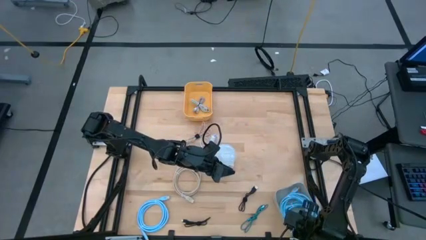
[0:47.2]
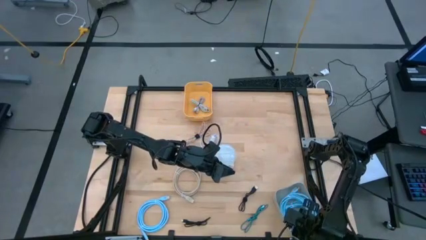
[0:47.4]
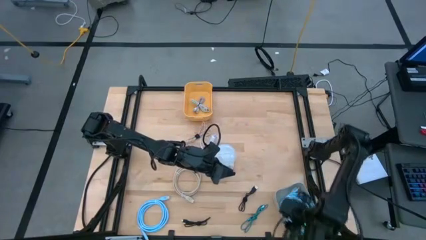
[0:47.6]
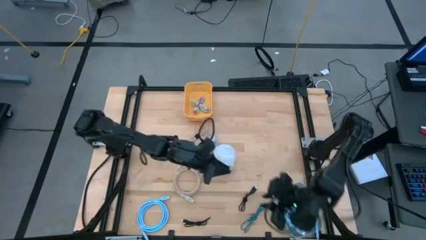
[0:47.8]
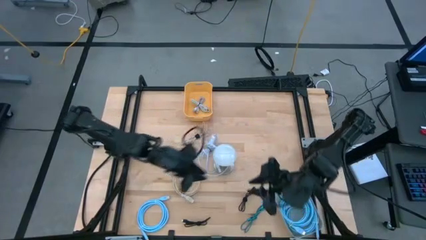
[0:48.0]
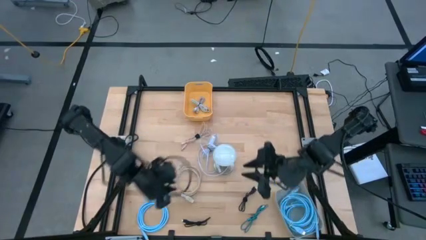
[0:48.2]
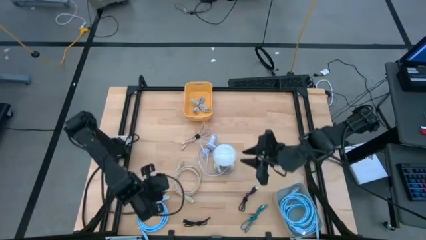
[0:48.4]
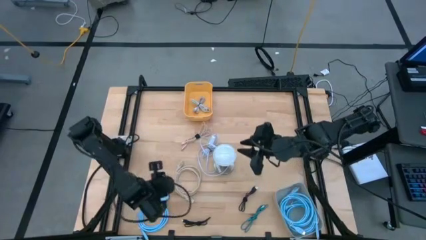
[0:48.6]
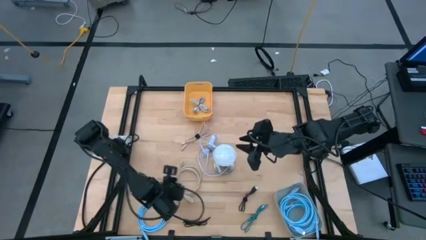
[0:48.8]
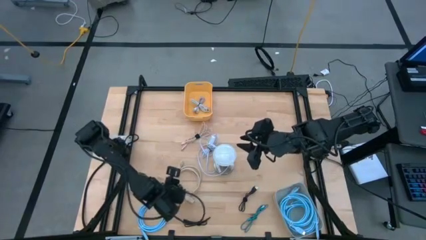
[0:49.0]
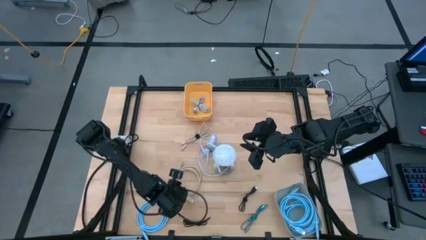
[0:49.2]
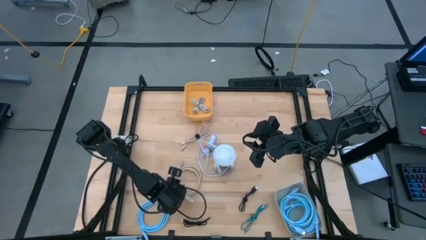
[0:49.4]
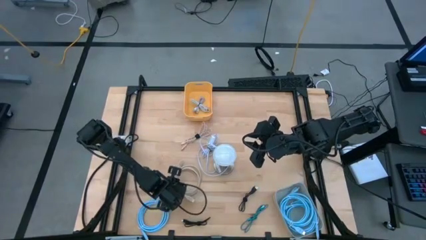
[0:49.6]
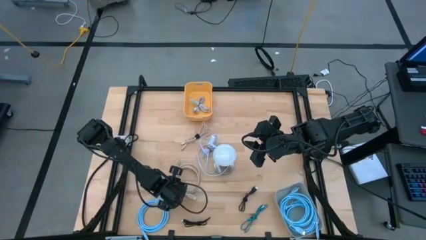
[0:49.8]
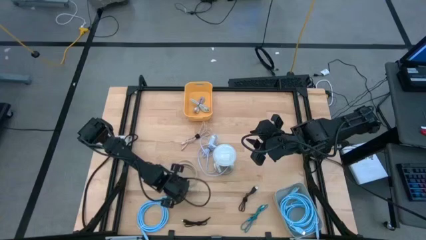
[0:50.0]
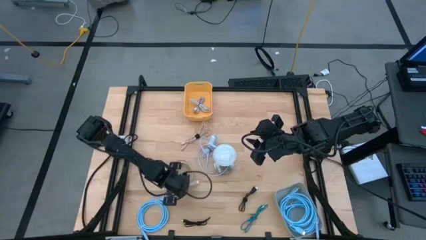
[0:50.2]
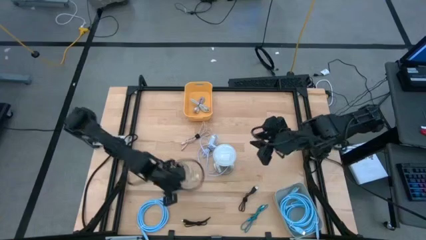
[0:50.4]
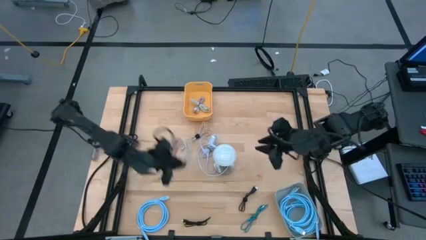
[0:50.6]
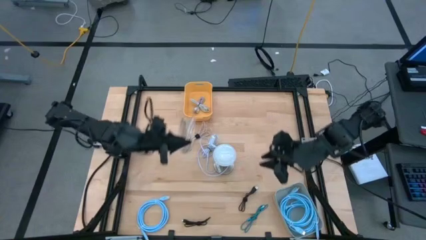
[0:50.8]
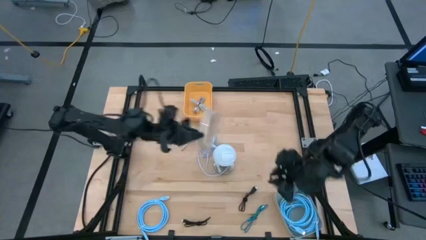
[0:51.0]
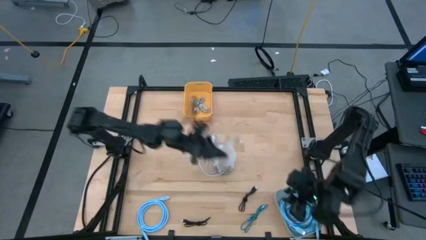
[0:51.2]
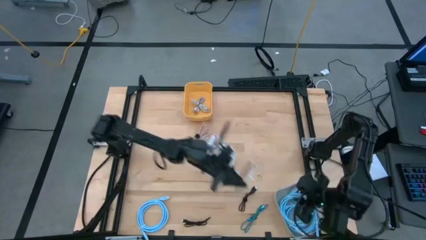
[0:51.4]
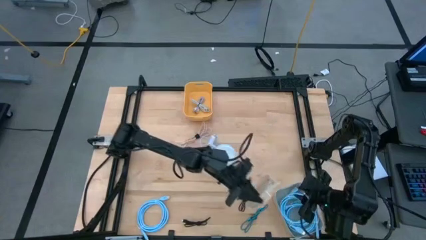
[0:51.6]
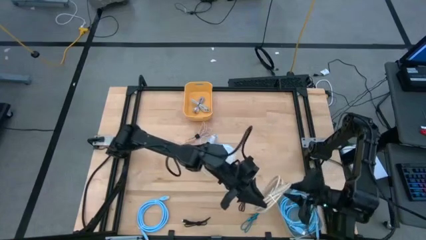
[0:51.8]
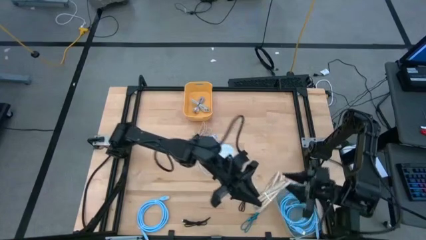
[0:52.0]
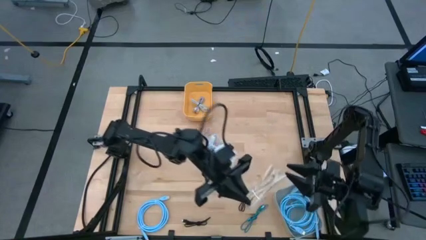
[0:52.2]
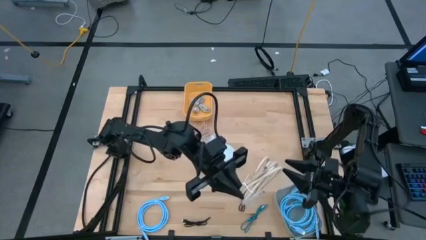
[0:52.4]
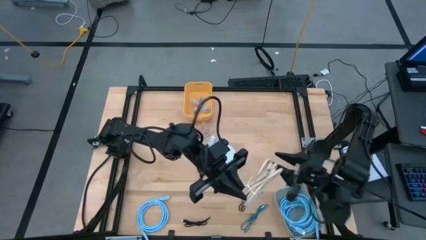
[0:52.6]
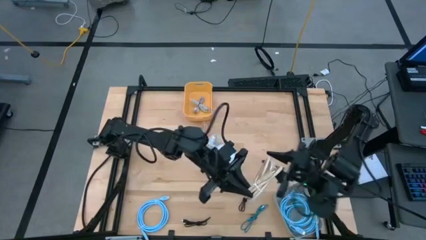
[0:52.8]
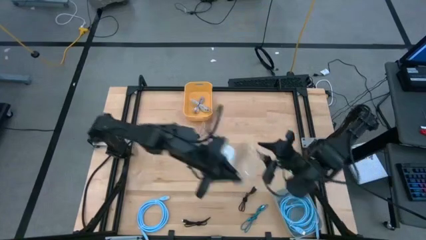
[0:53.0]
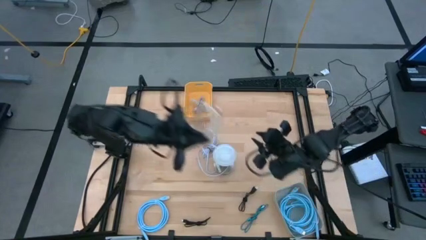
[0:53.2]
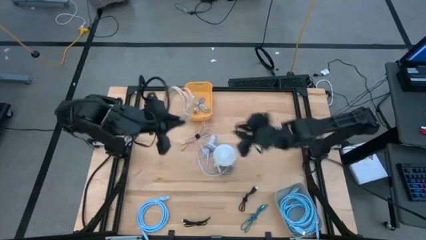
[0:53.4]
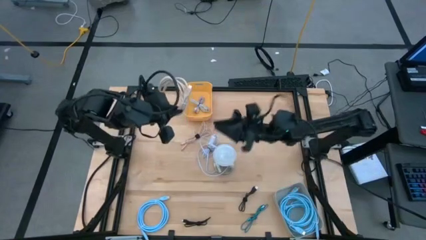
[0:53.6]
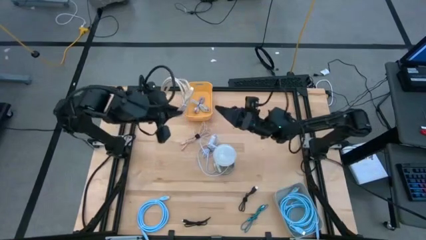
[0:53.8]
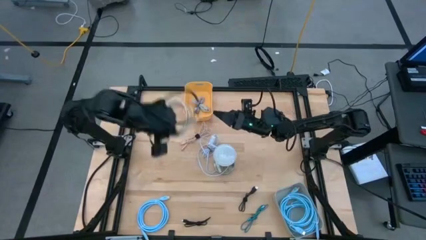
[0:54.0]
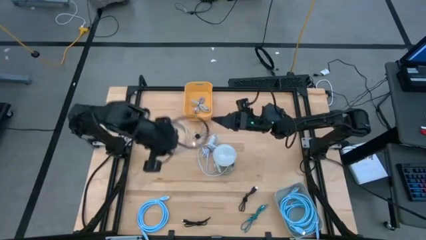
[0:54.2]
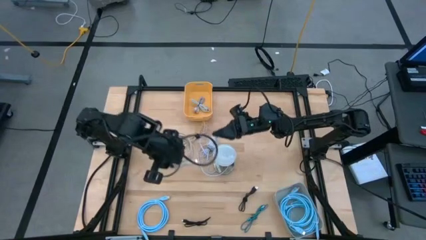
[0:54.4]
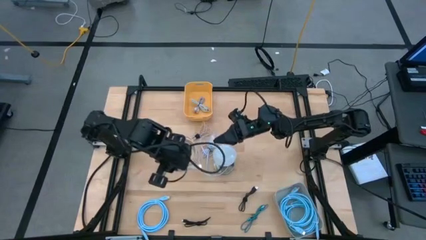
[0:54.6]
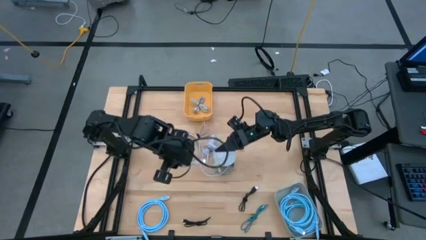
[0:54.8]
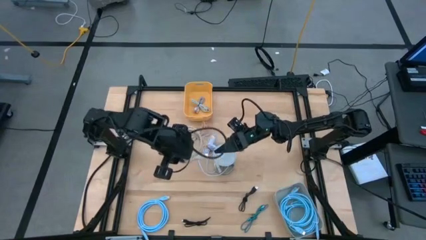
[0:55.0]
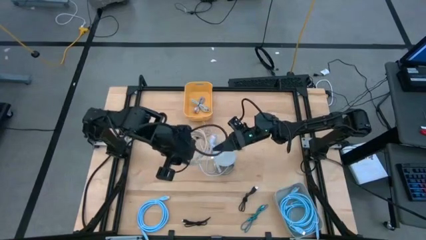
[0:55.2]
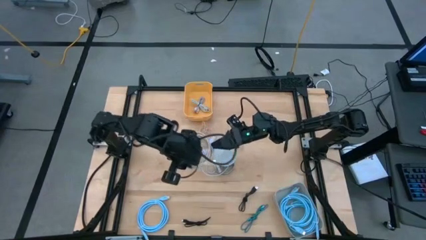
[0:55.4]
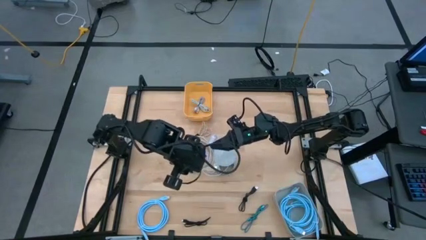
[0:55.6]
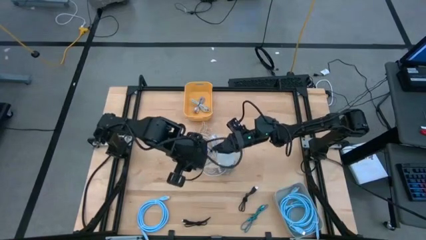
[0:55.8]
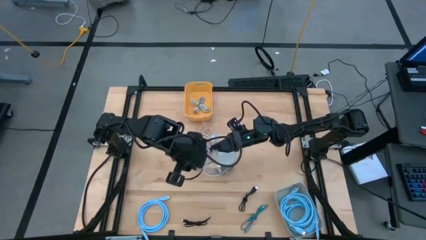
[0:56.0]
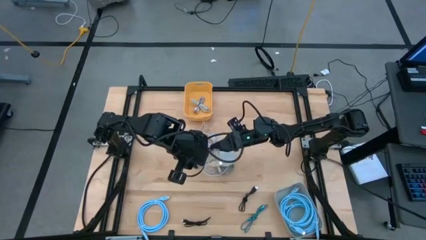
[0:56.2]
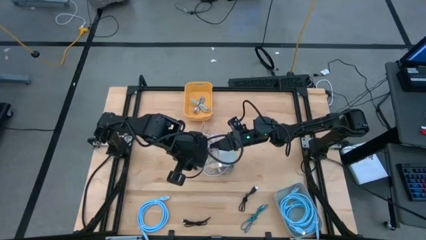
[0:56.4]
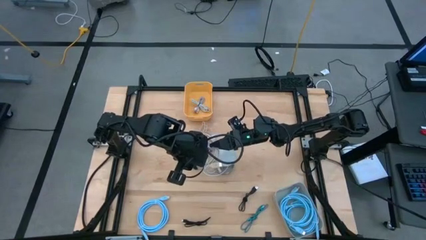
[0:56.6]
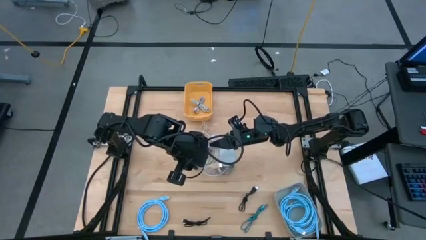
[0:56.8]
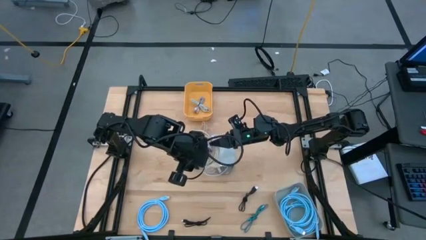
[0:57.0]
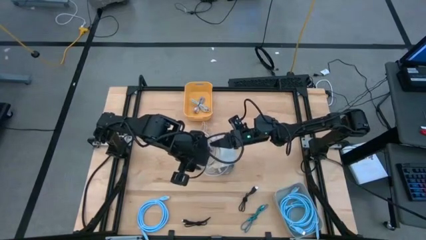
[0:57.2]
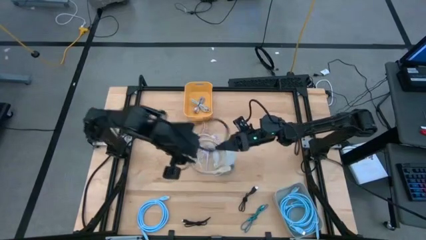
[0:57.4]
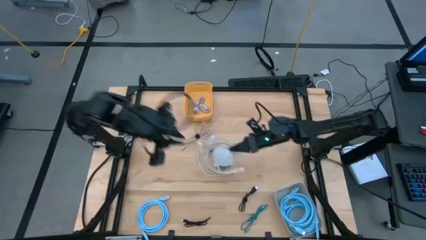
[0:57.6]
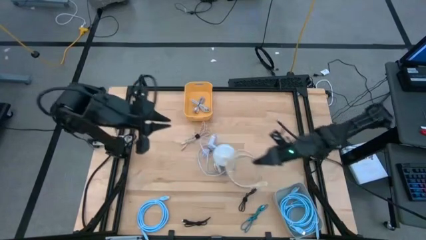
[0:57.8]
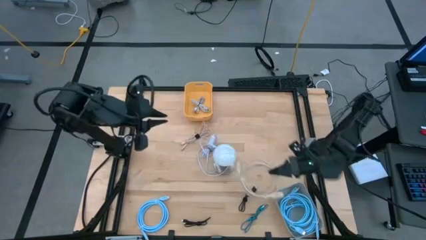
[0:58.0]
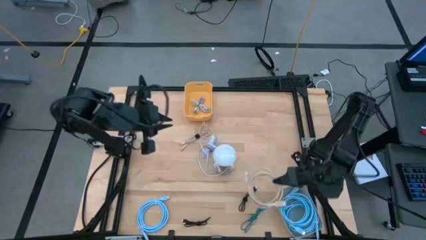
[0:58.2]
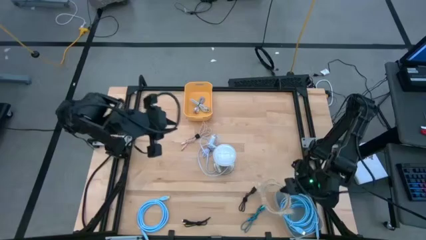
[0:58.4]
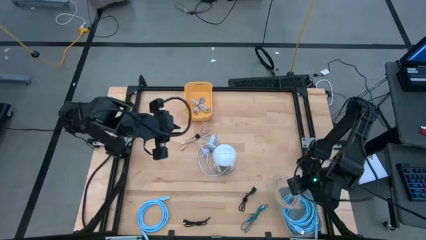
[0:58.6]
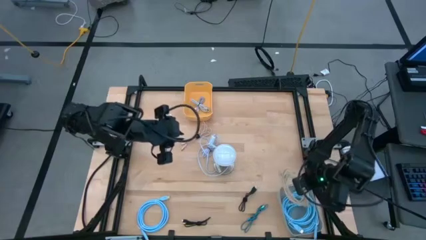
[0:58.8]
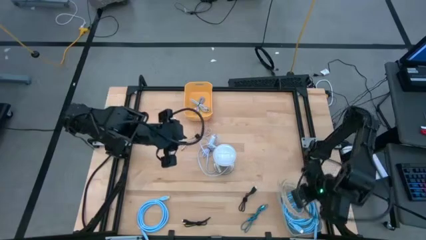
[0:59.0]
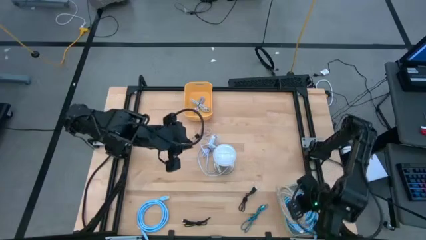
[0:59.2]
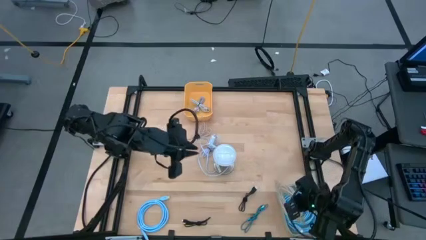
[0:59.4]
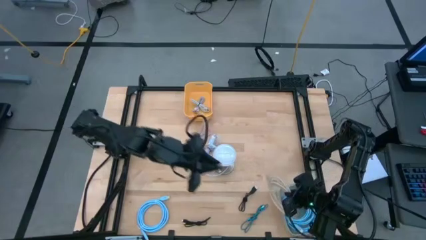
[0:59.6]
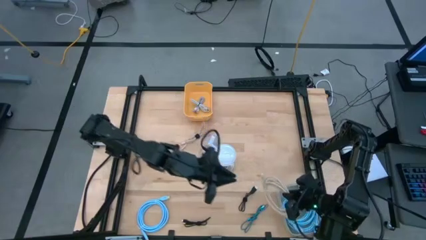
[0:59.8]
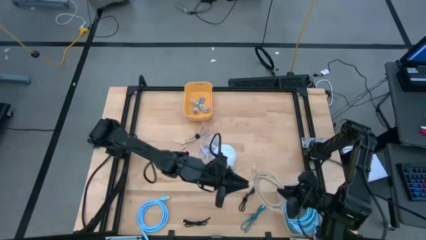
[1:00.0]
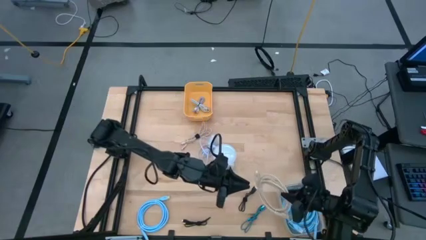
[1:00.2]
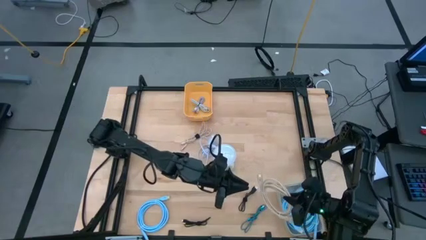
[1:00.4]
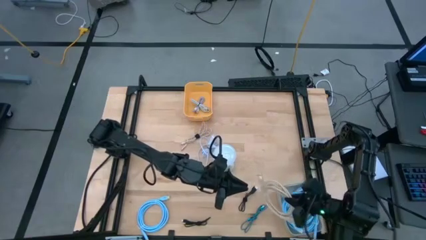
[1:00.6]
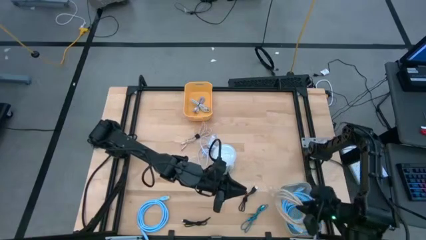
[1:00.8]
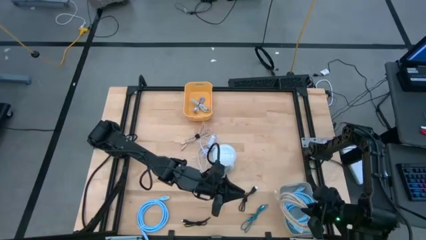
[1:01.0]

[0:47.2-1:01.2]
Task: Pick & Place USB Port
Put the brown HDMI cable into the gray bin
